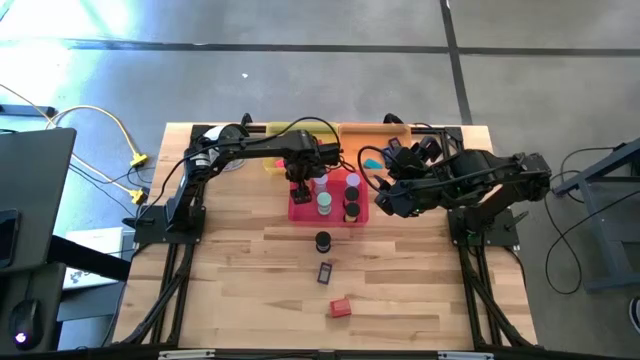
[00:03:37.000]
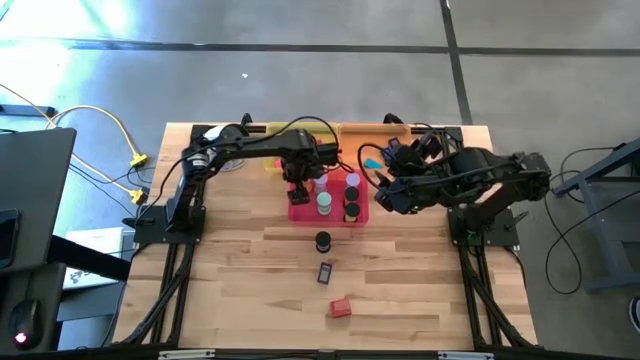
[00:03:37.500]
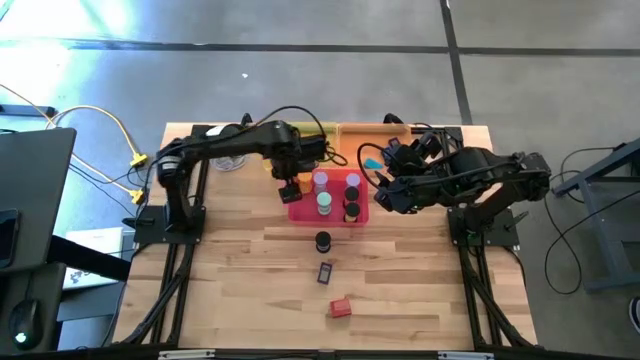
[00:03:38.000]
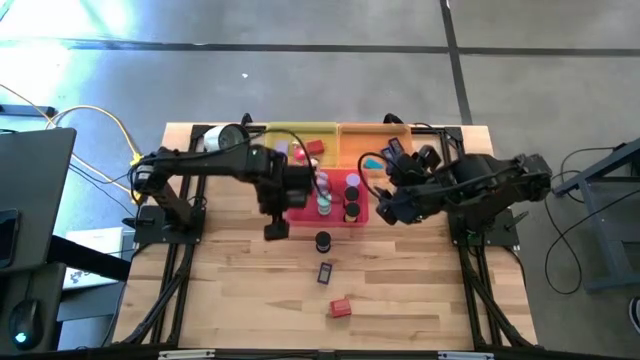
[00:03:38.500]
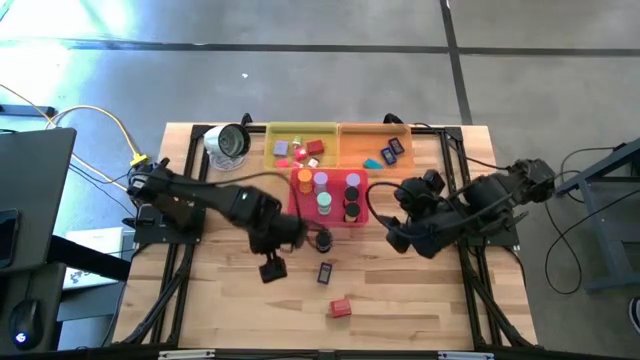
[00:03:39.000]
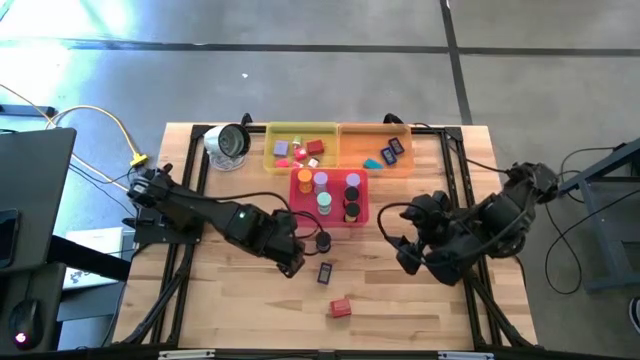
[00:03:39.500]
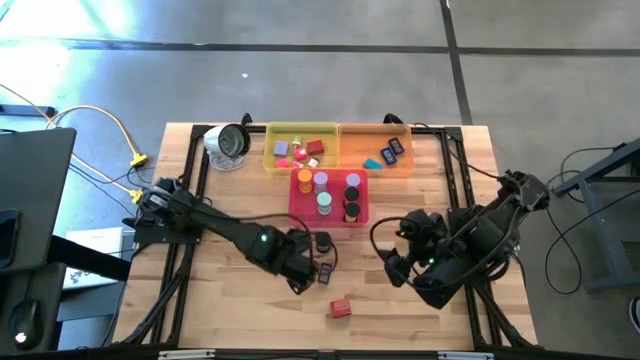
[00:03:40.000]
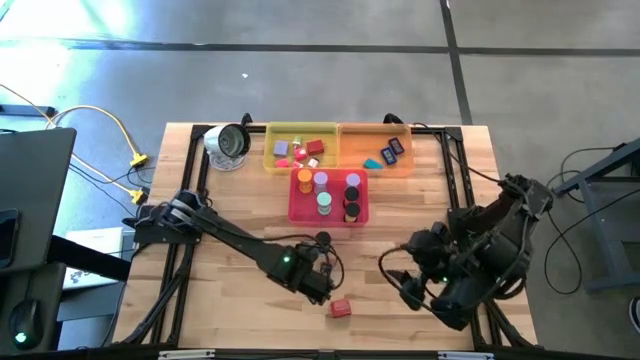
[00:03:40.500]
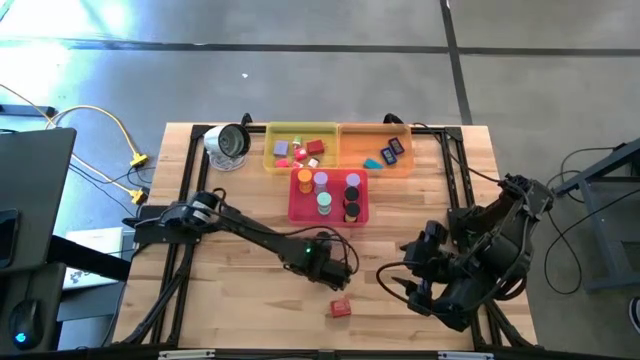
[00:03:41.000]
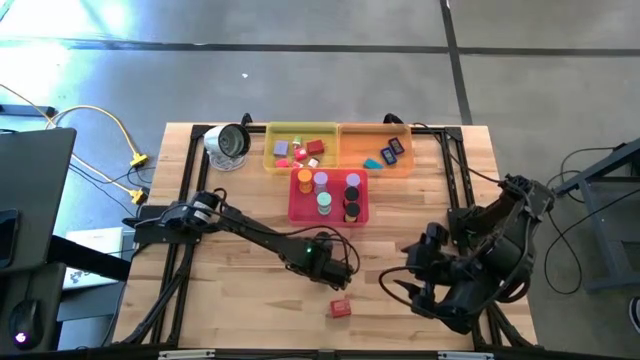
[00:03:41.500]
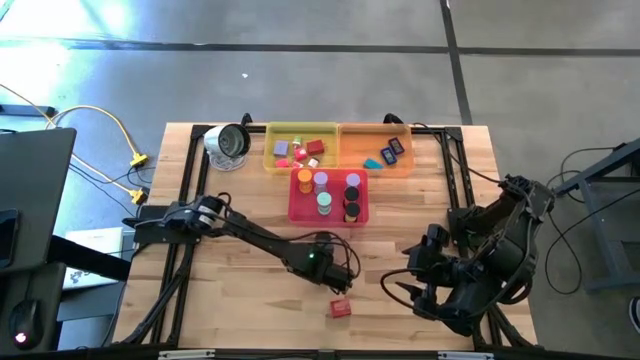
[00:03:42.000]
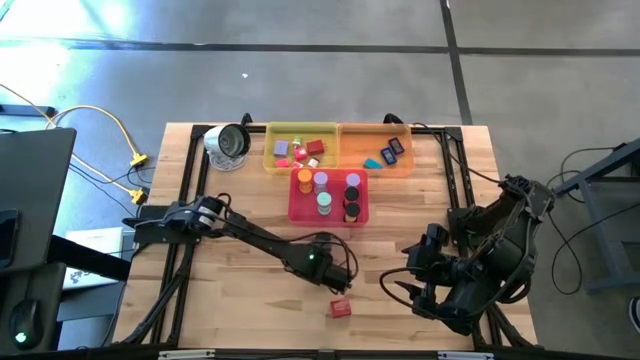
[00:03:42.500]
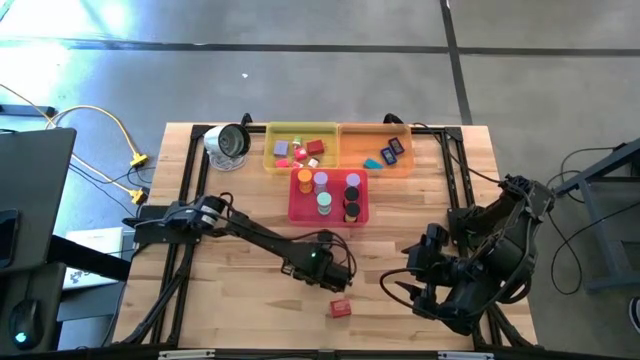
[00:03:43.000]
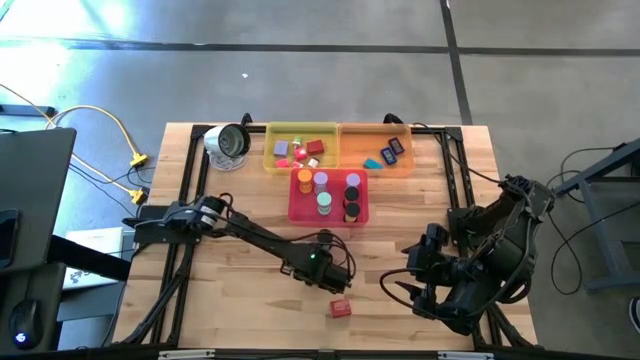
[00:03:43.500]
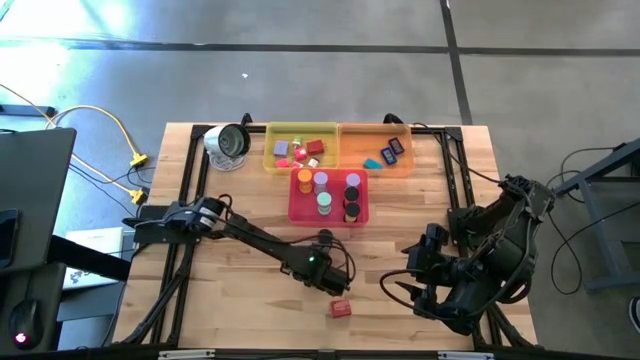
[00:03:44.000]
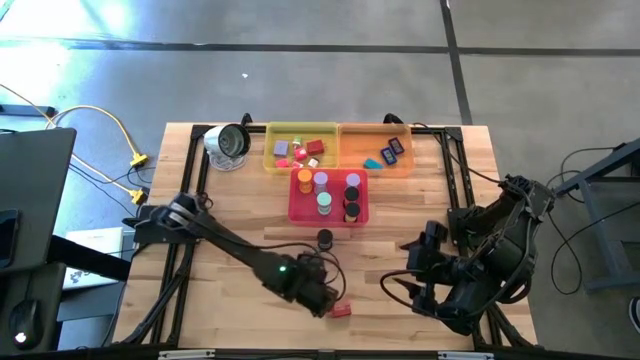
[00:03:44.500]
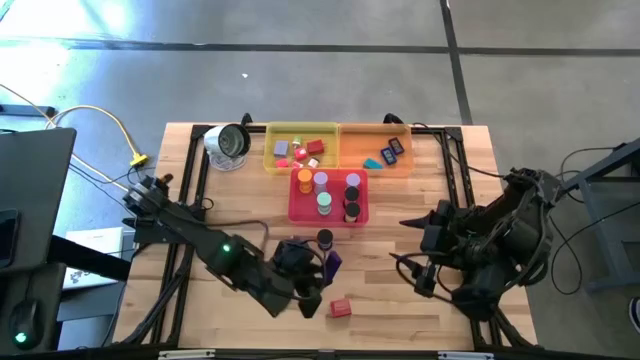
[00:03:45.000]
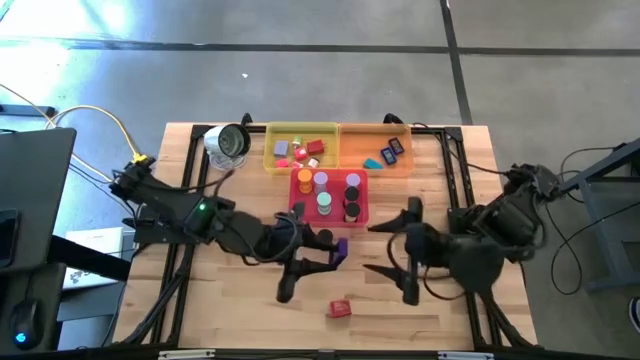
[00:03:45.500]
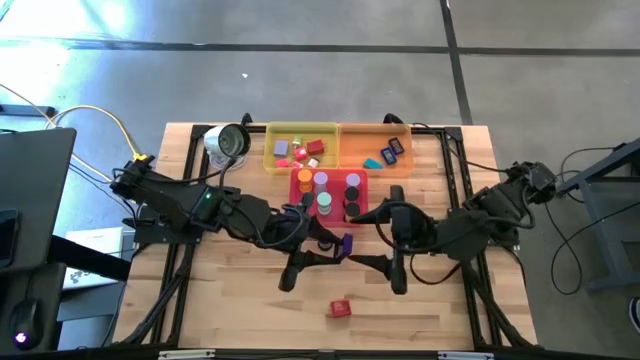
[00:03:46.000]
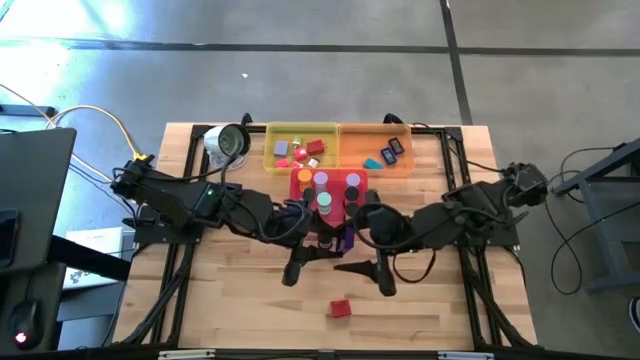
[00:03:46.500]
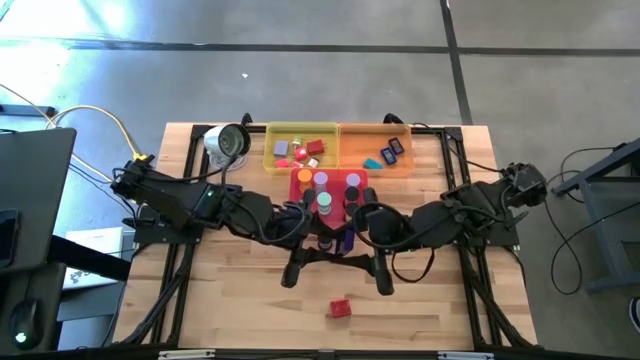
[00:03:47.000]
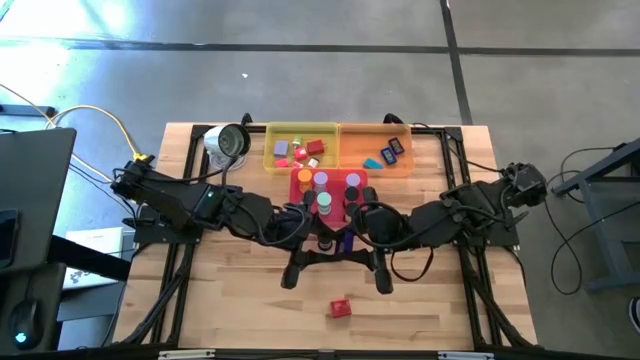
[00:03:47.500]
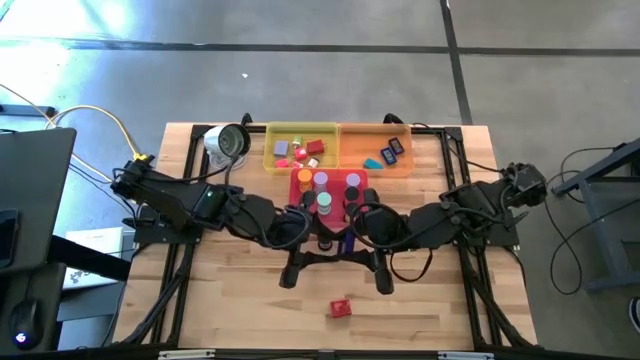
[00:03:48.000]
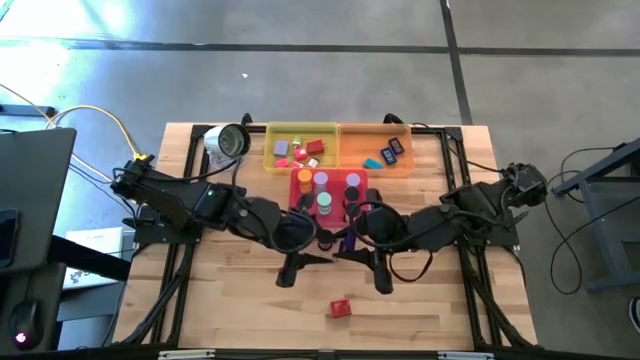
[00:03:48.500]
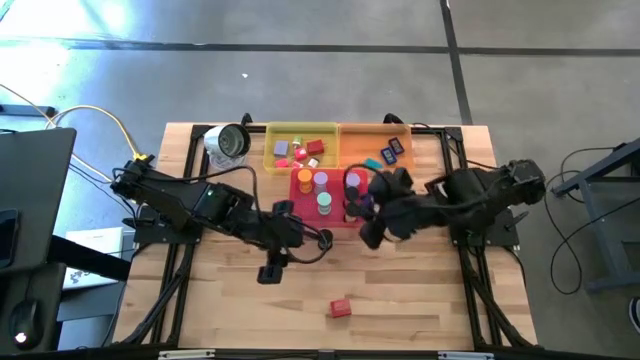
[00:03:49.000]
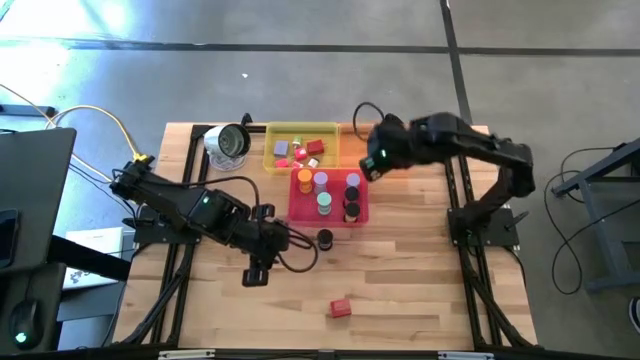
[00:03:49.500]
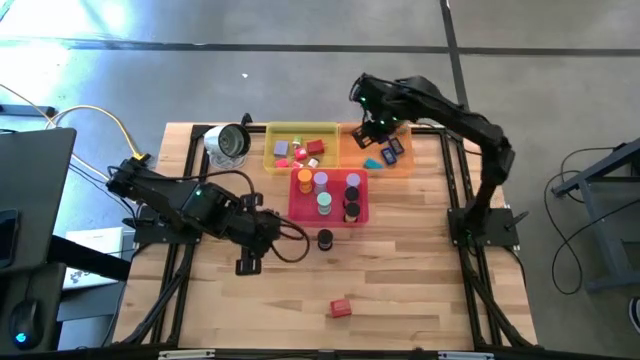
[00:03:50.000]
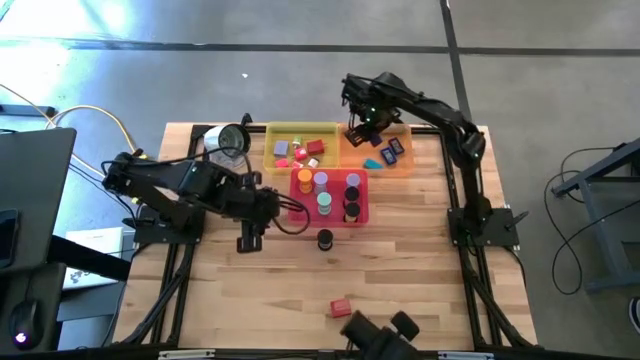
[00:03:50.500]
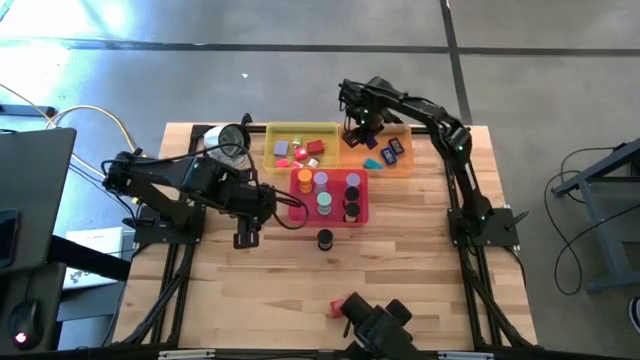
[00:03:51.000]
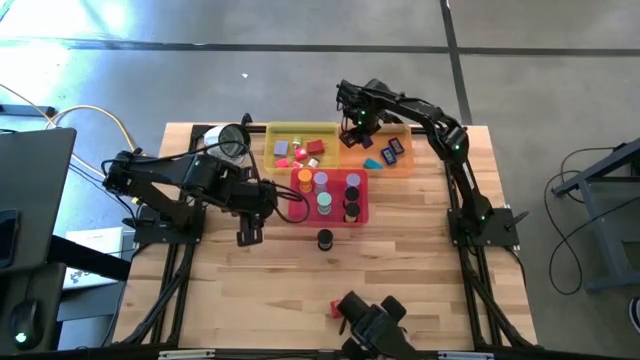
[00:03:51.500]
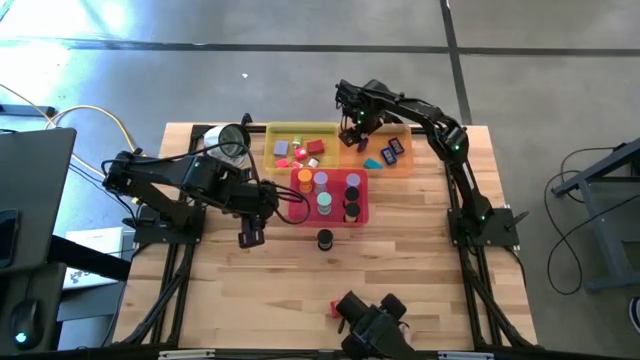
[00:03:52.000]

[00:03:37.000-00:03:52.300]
Task: Pick & Place Office items
Put the dark blue digital clock into the orange bin

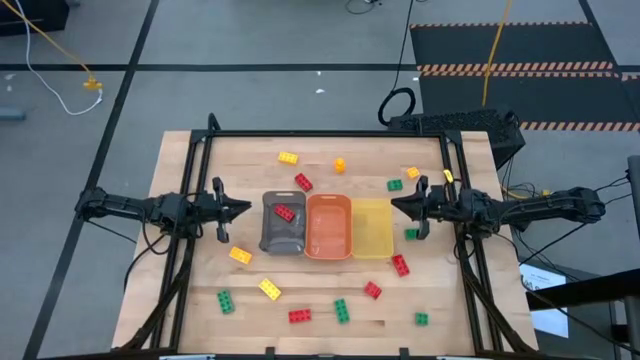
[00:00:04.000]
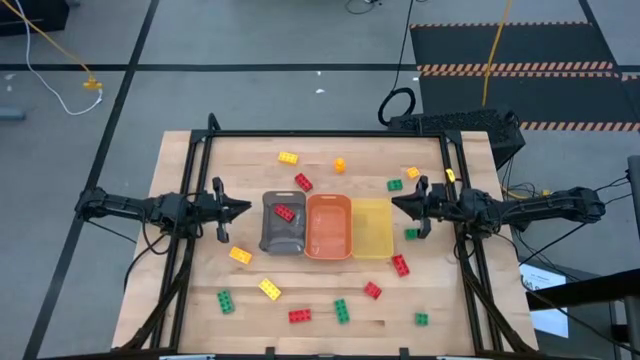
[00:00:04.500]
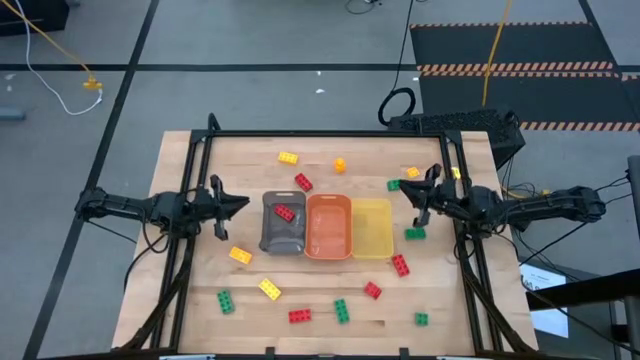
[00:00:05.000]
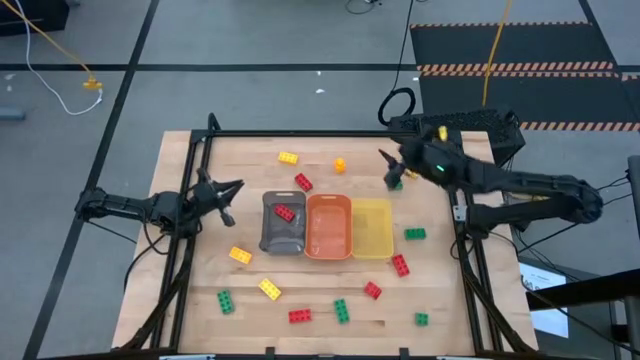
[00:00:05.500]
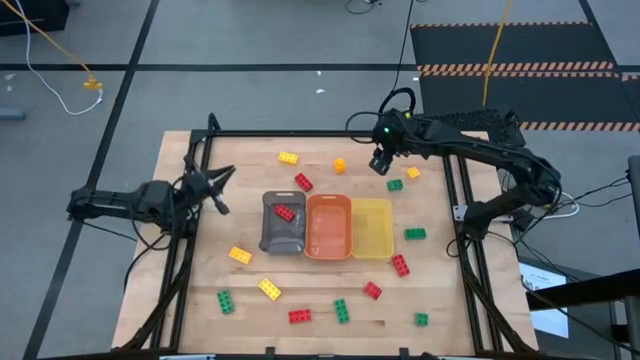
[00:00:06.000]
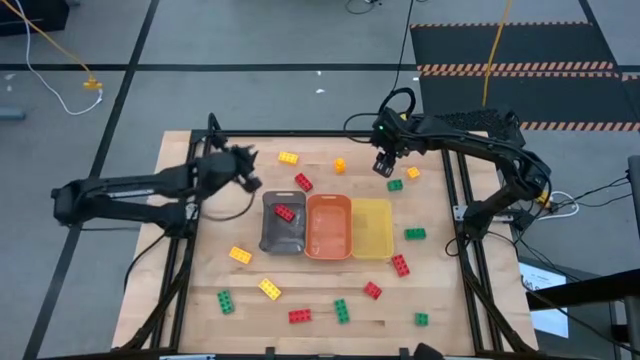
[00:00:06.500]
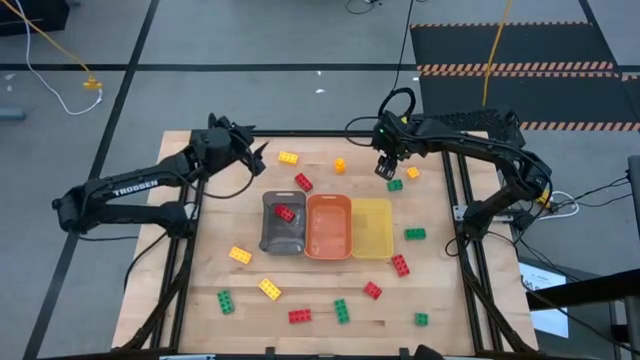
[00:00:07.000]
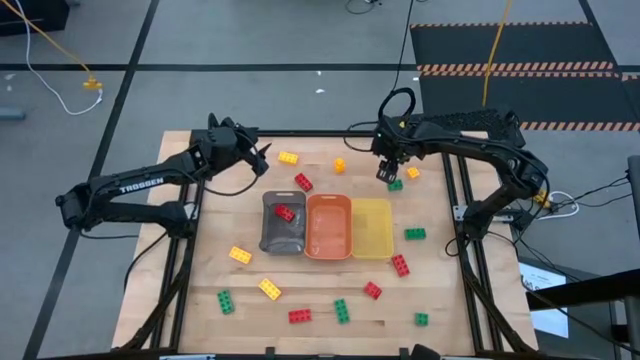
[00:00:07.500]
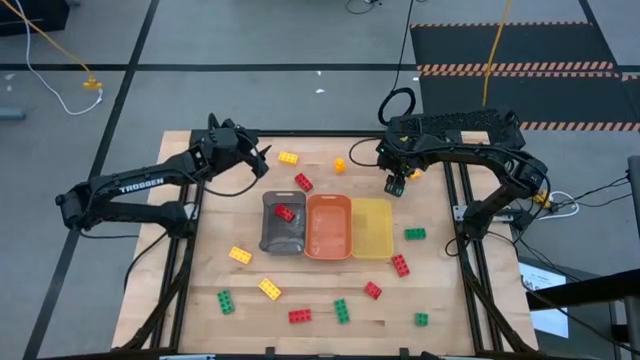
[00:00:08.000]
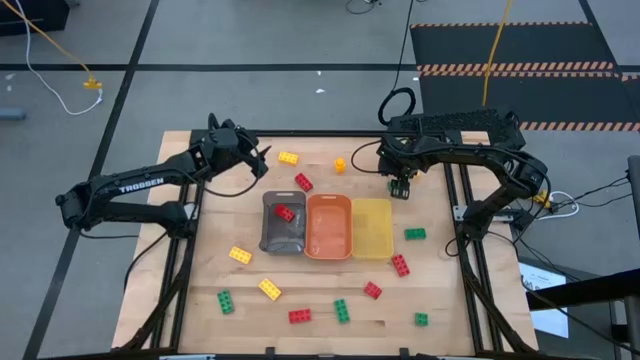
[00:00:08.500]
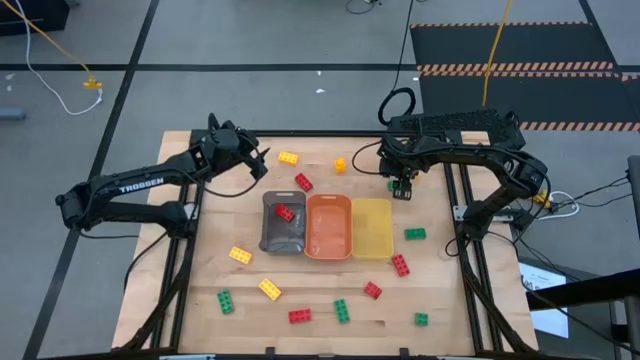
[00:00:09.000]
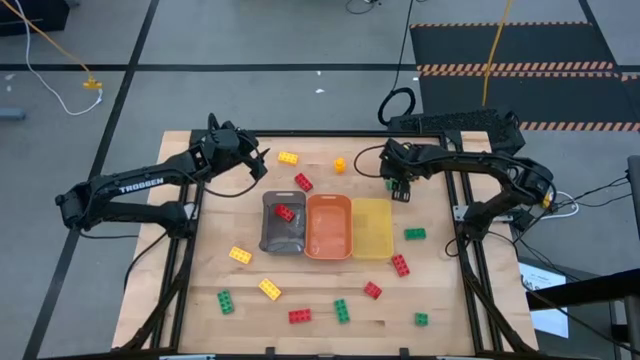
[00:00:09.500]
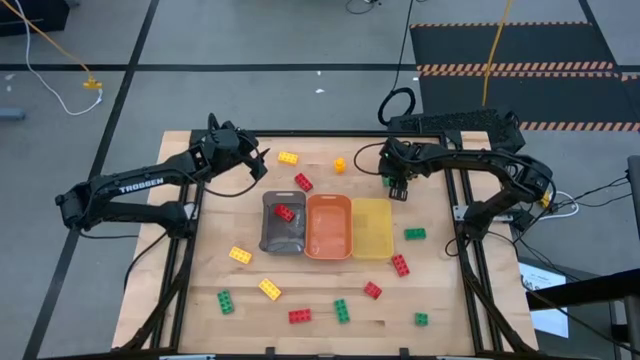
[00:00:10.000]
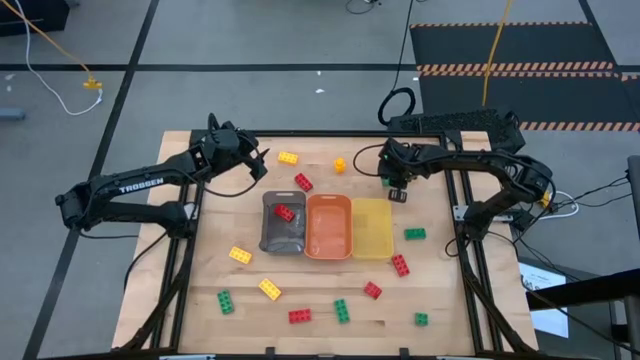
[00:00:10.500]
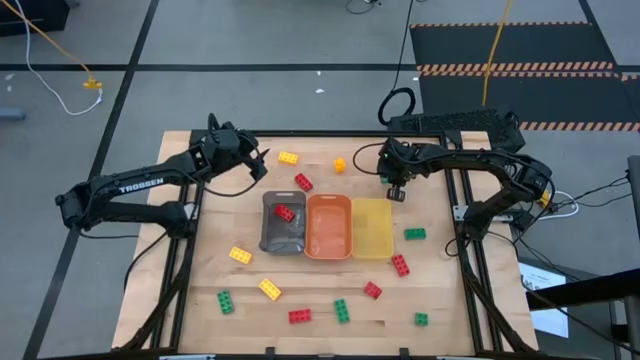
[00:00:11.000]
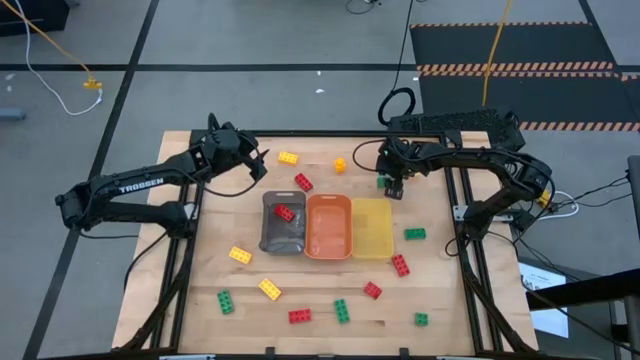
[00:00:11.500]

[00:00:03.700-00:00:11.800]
Task: Sort & place blocks by color
Put the green game piece into the yellow bin
